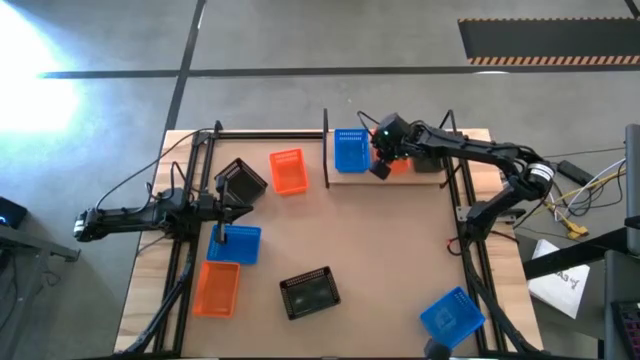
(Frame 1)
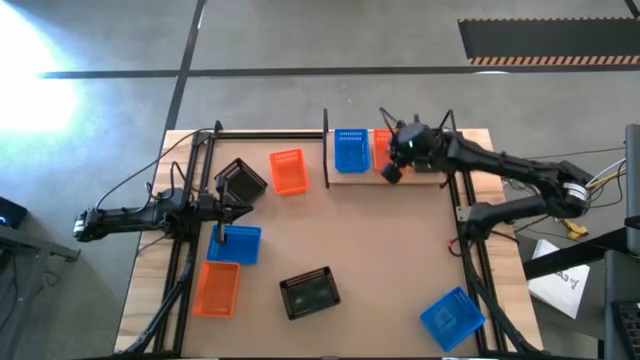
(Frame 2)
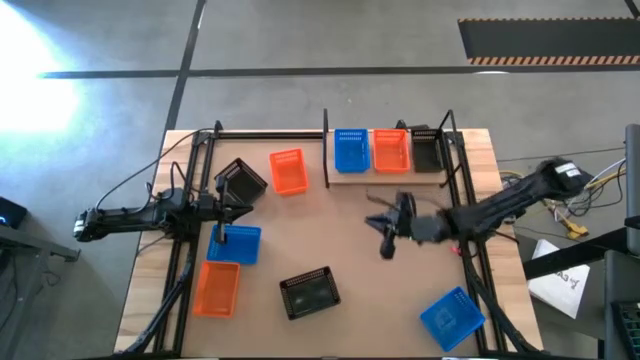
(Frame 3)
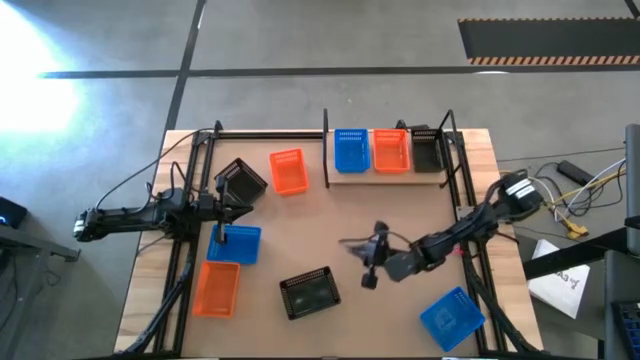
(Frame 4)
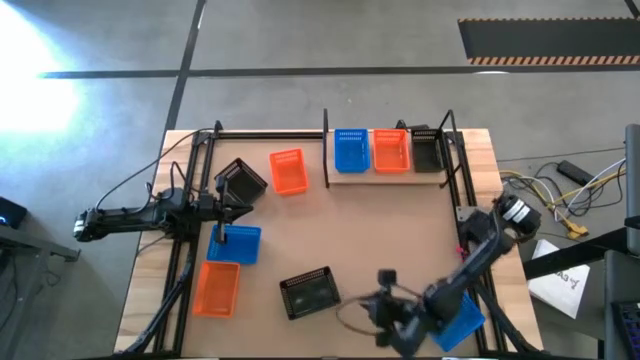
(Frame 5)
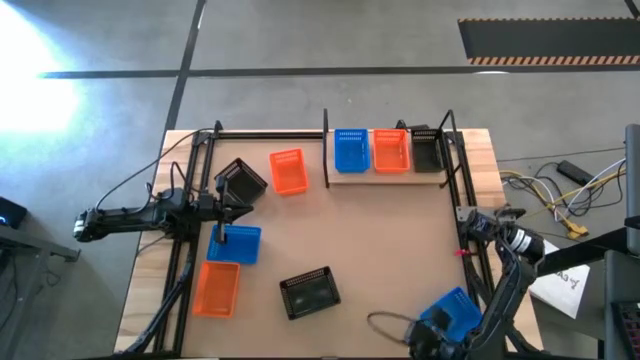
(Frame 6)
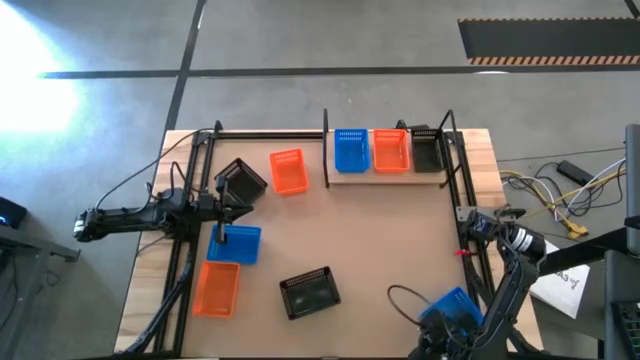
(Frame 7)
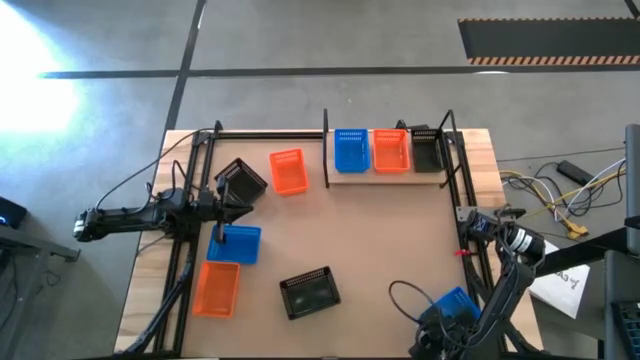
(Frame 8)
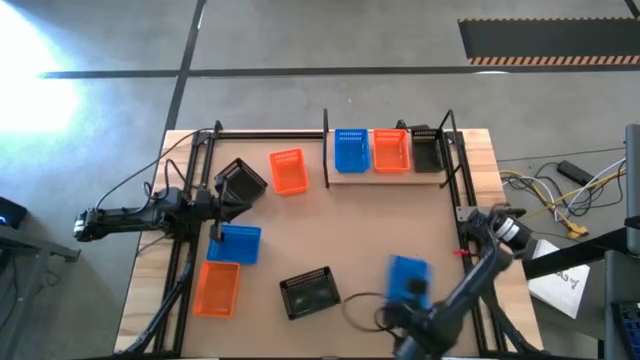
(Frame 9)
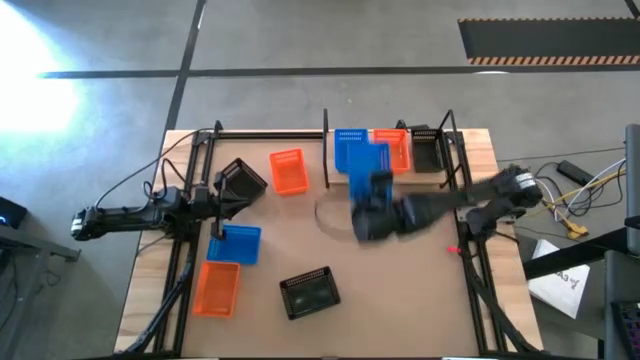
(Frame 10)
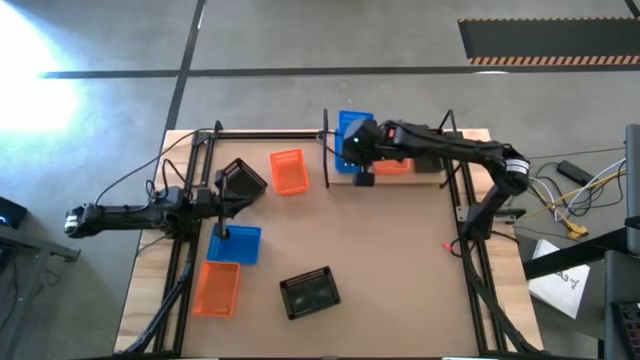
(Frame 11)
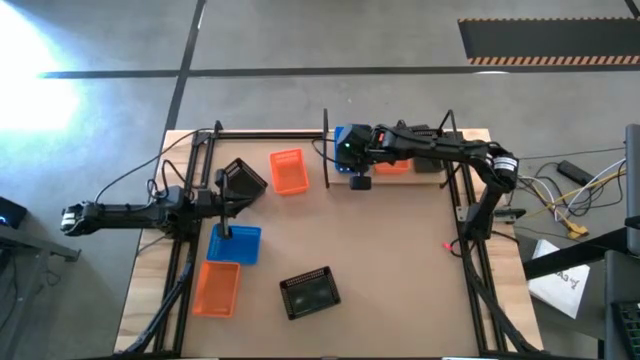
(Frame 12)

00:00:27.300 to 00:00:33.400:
Task: Stack baskets on shelf by color
Stack the right blue basket on the other blue basket on the shelf

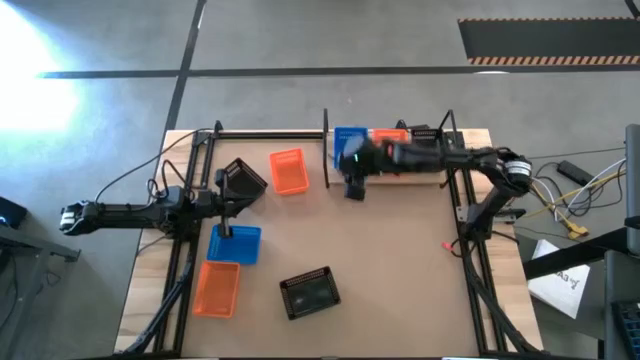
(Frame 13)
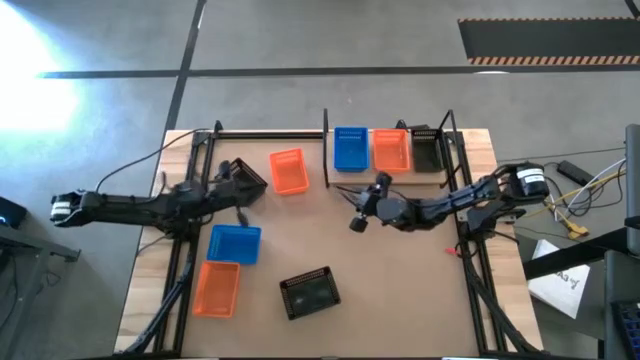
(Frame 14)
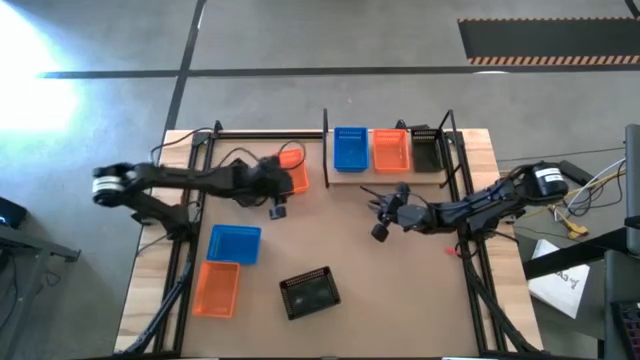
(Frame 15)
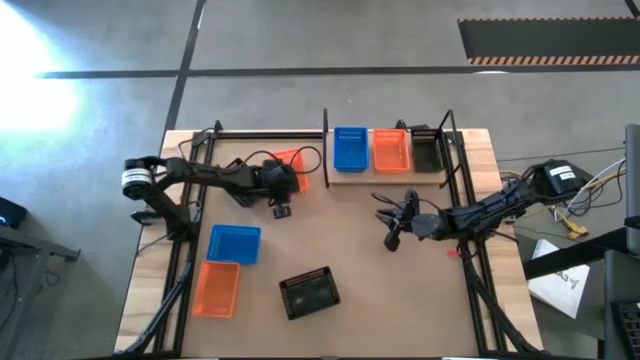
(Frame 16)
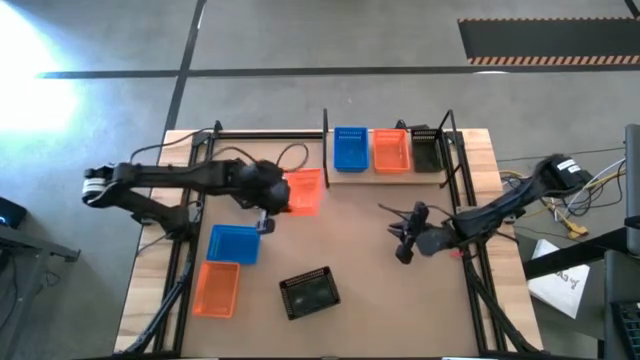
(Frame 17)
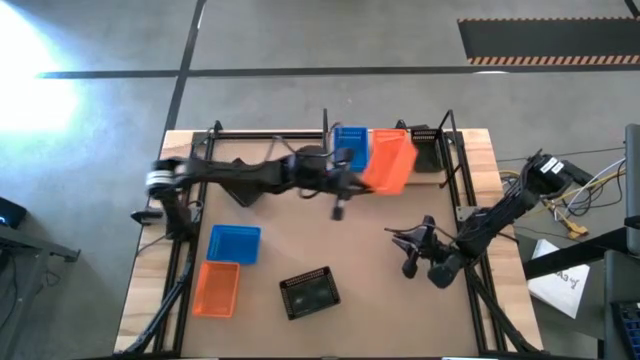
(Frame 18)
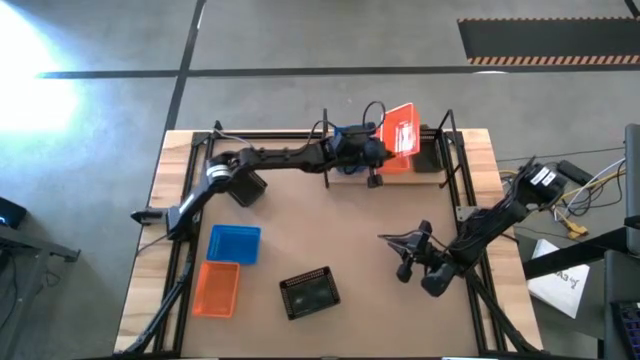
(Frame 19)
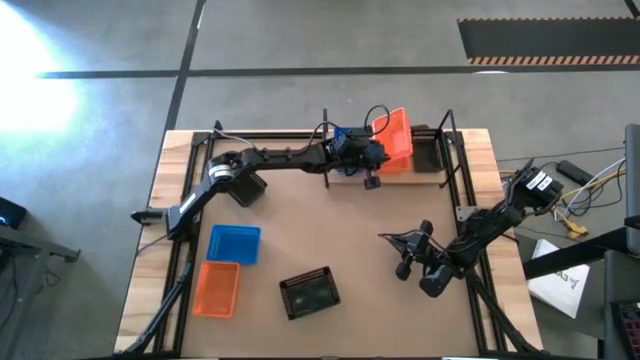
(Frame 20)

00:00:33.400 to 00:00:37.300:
Stack the top orange basket on the other orange basket on the shelf

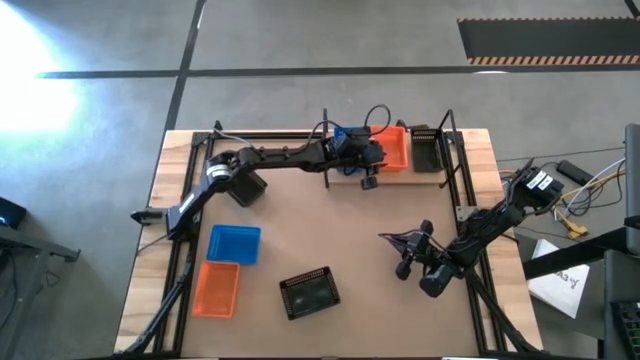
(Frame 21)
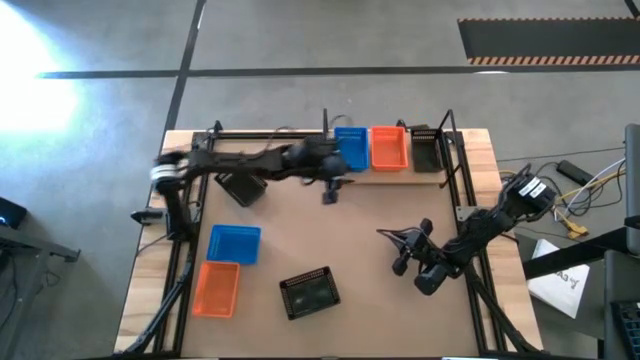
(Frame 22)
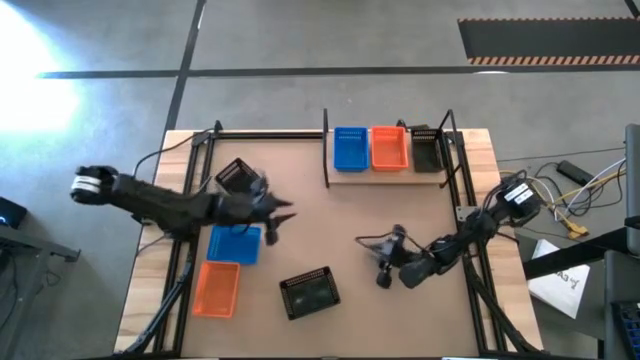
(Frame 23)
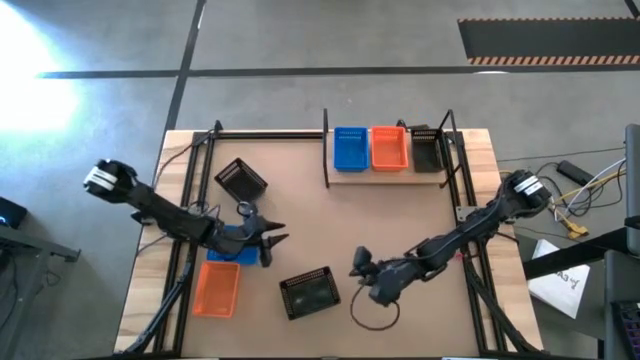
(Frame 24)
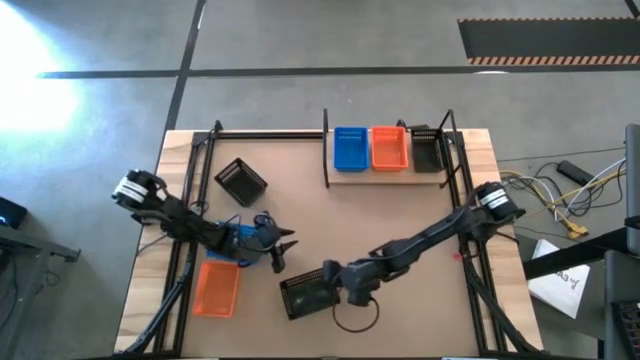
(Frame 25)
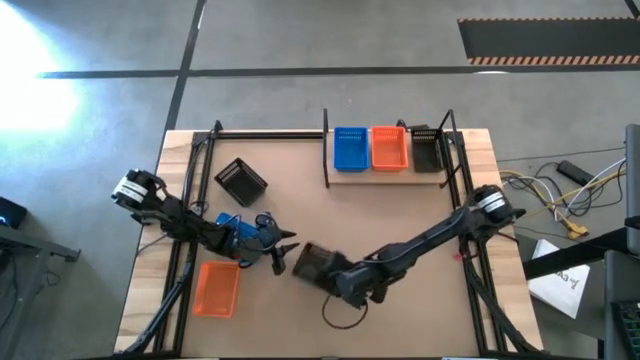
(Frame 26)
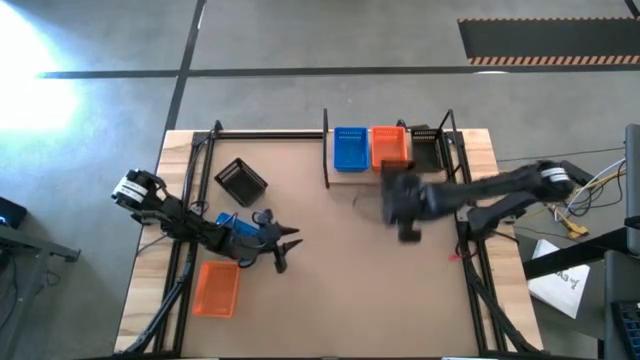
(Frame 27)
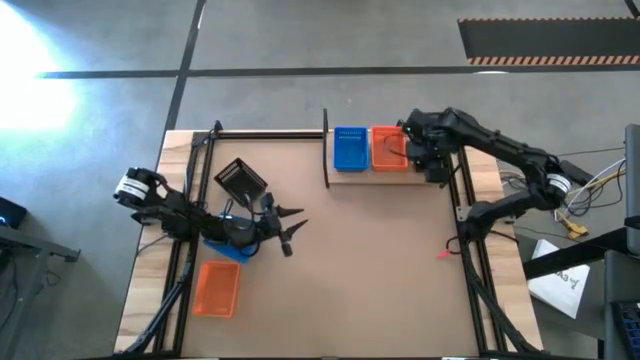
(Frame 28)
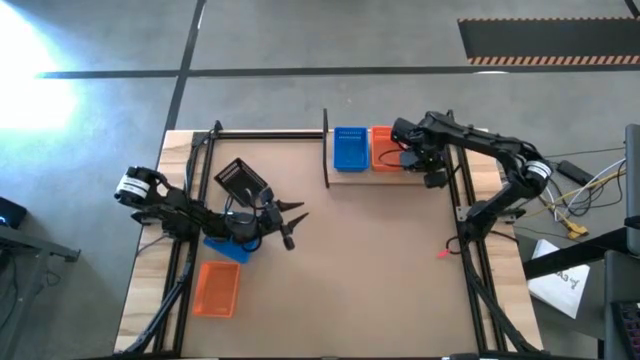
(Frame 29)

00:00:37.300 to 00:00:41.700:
Stack the bottom black basket on the other black basket on the shelf

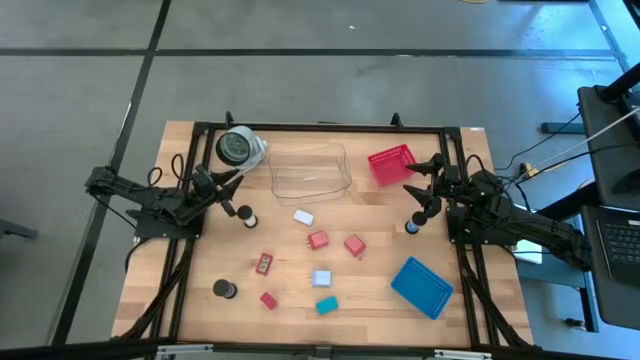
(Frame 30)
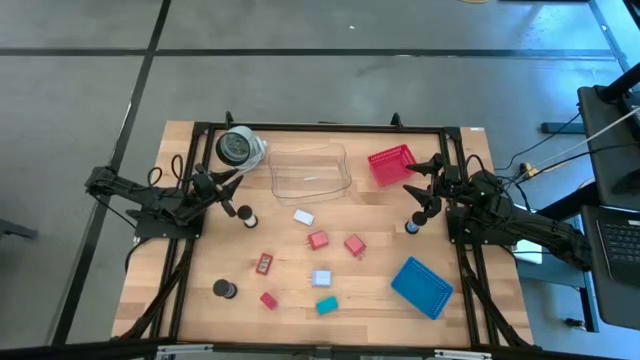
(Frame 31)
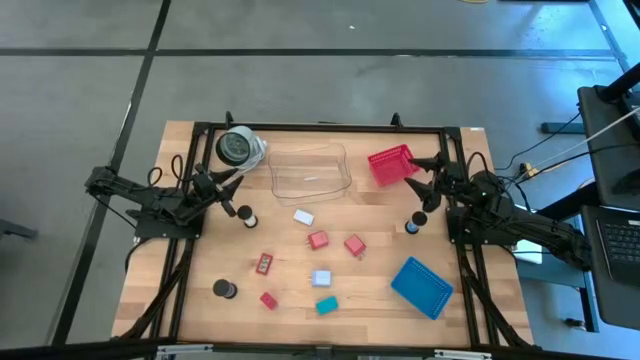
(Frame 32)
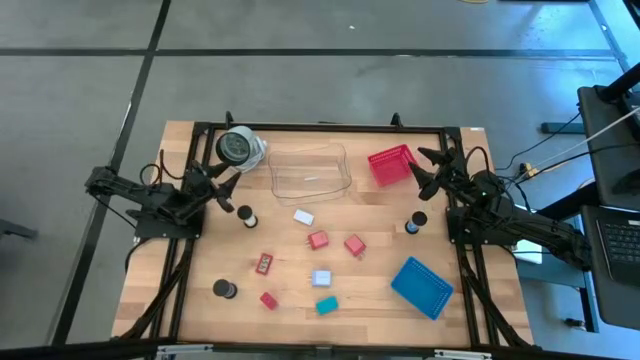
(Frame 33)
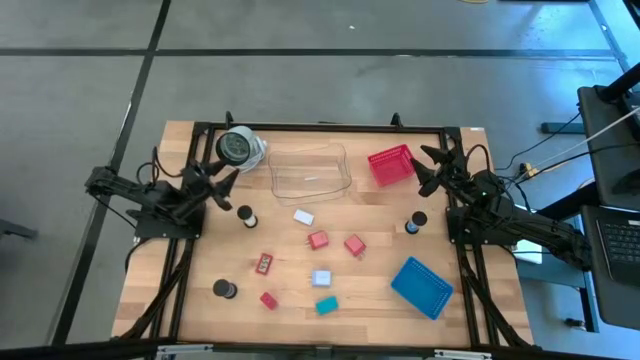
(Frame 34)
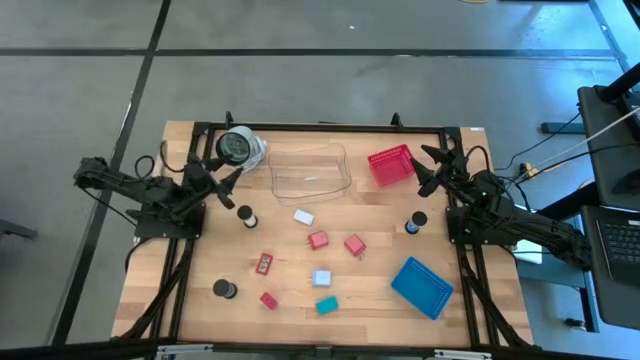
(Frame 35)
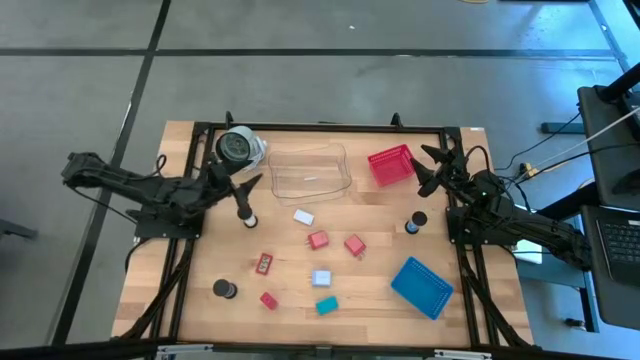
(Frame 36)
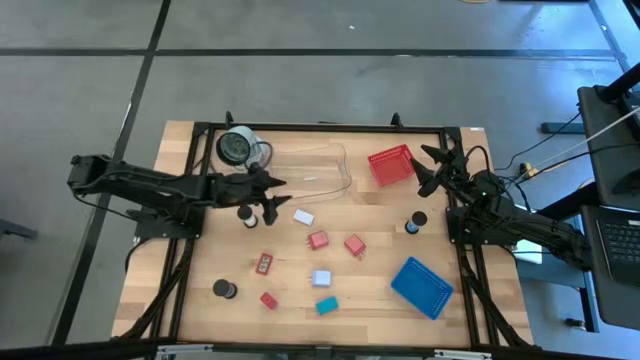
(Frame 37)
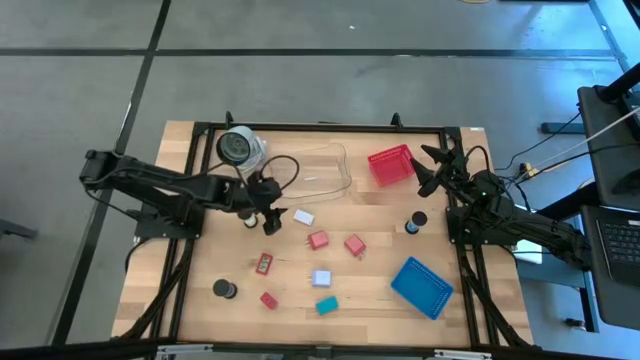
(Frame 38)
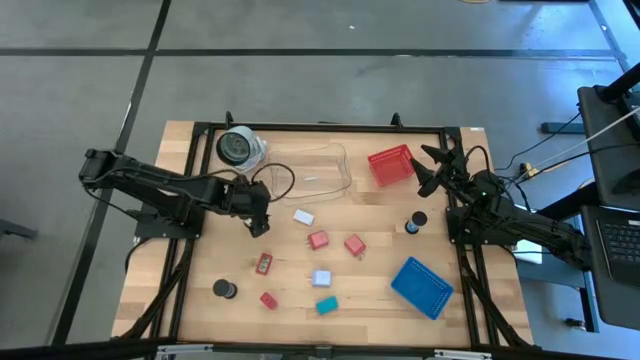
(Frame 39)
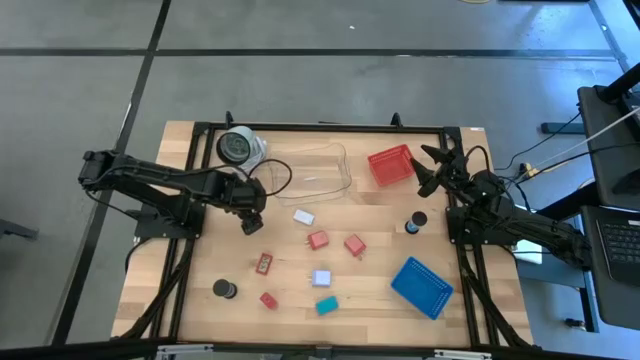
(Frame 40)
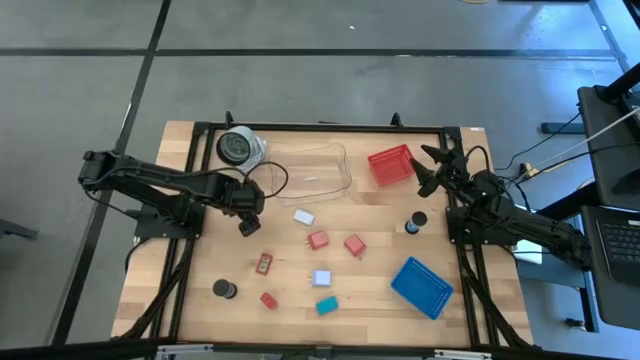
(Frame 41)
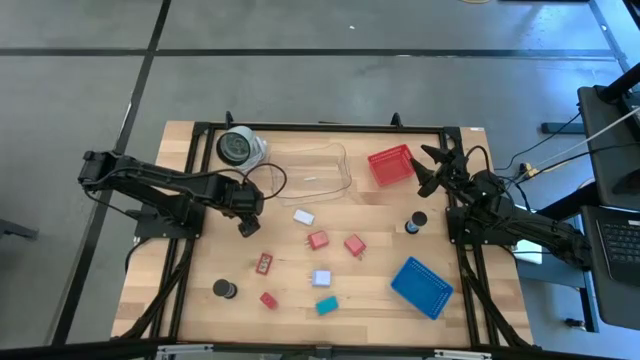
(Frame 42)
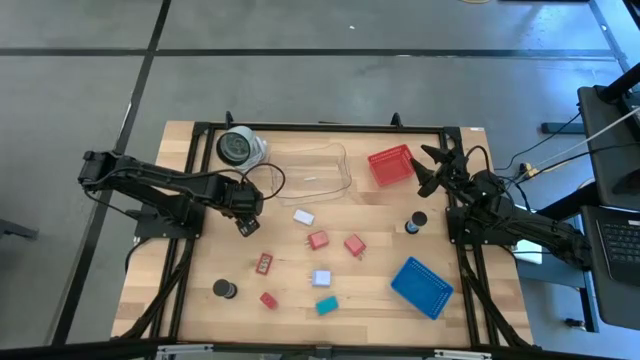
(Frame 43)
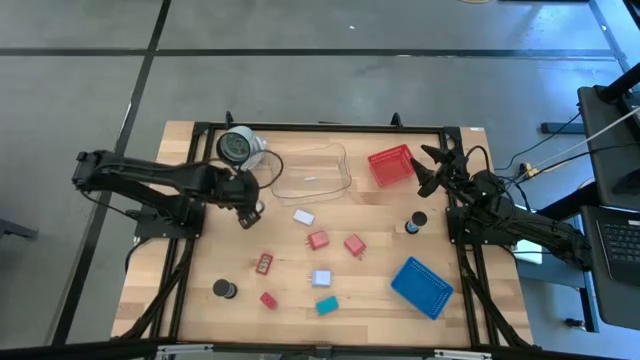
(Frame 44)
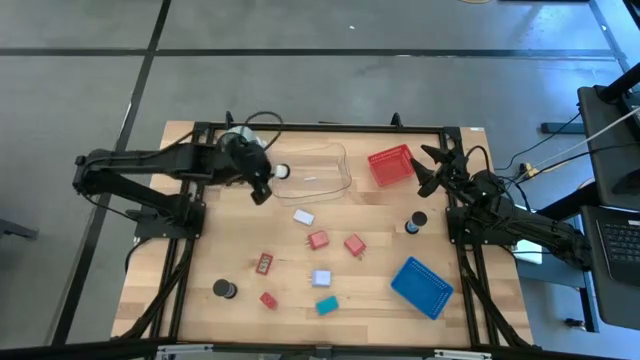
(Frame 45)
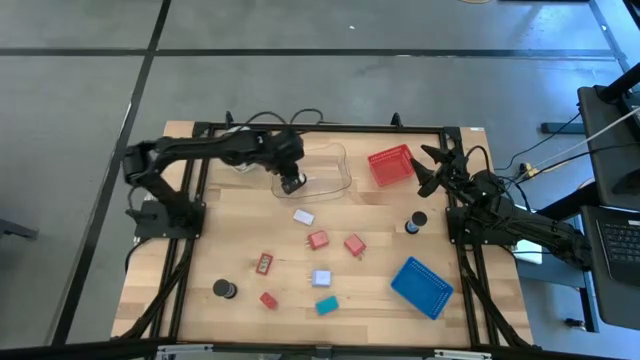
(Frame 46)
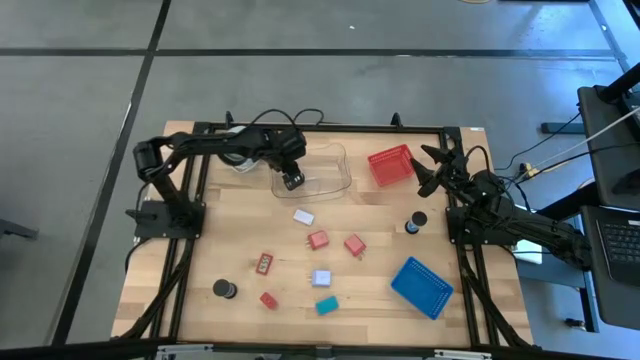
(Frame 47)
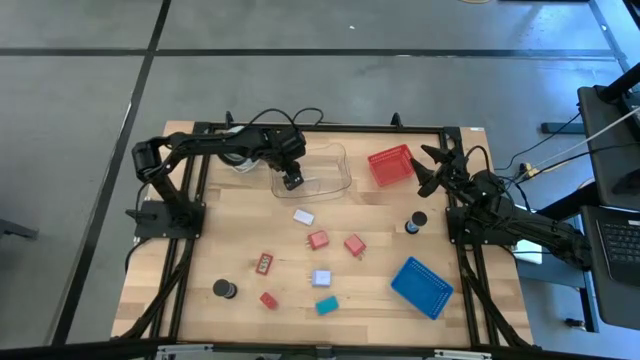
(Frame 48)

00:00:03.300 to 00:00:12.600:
Task: Pick & Place Office items
Put the white hourglass into the transparent bin
